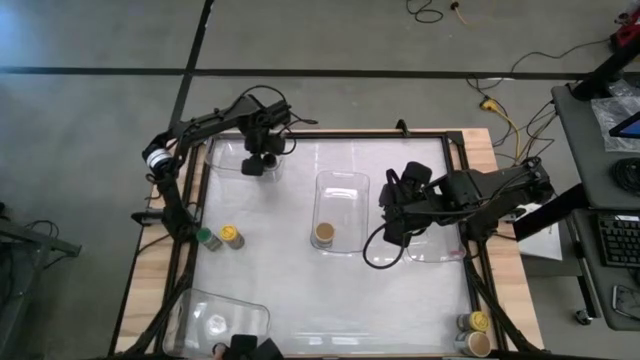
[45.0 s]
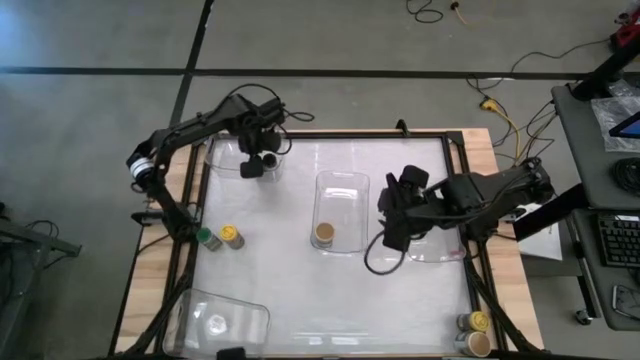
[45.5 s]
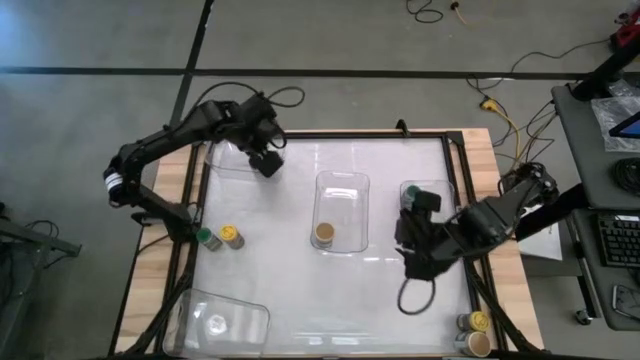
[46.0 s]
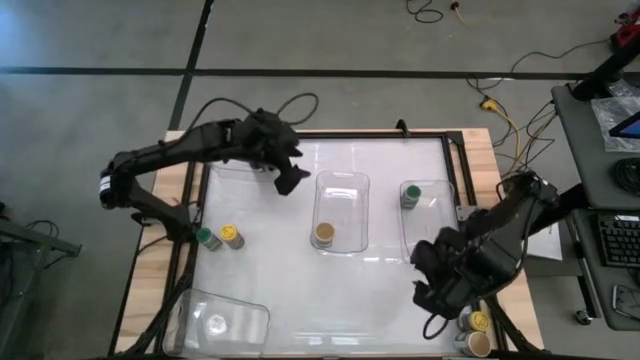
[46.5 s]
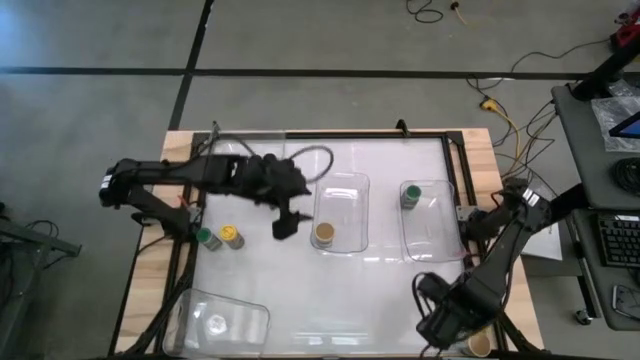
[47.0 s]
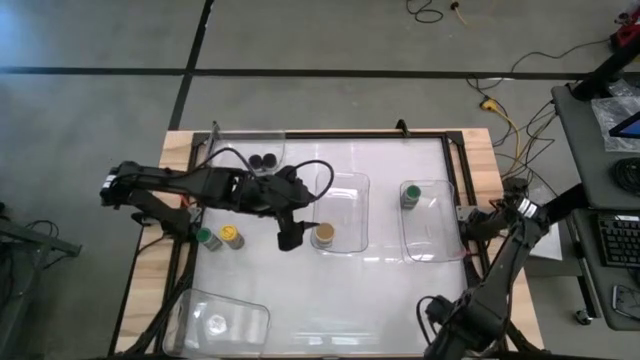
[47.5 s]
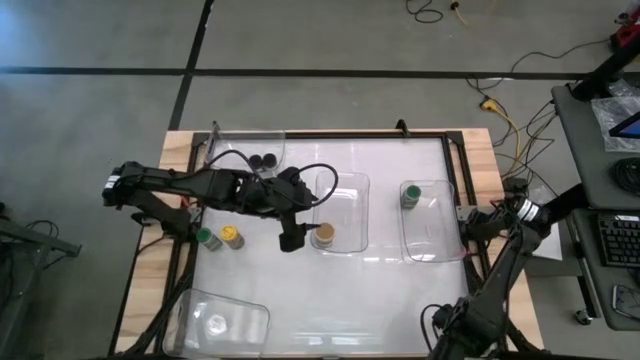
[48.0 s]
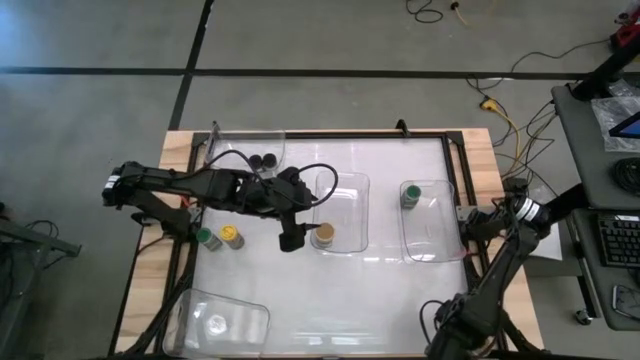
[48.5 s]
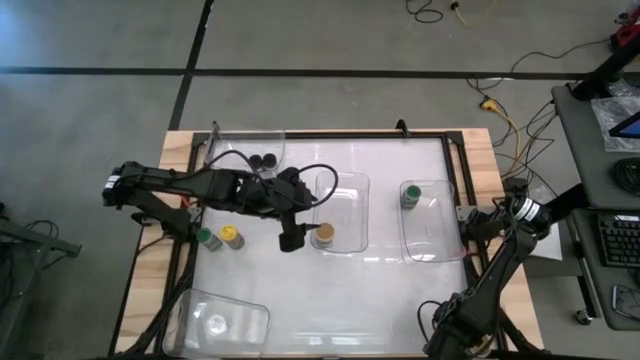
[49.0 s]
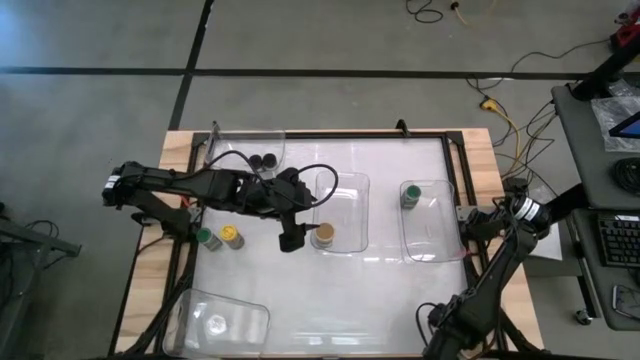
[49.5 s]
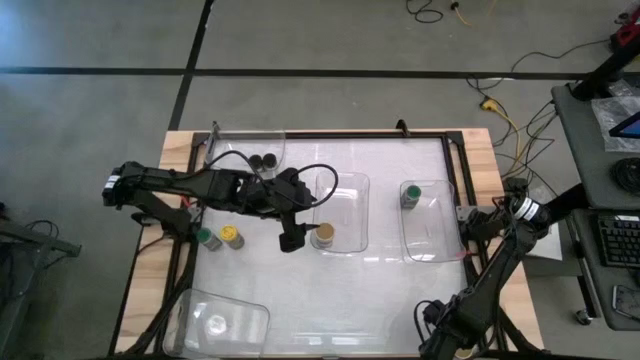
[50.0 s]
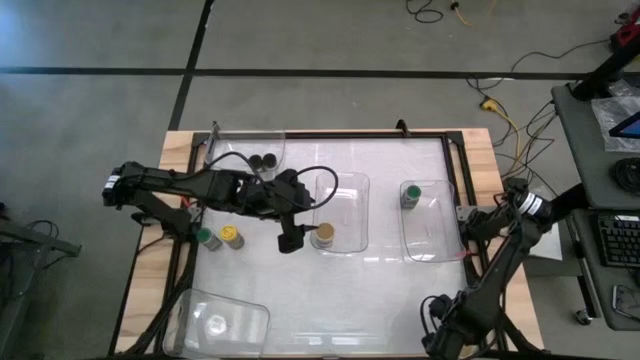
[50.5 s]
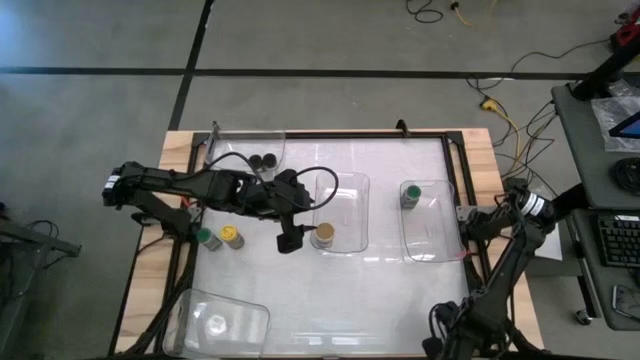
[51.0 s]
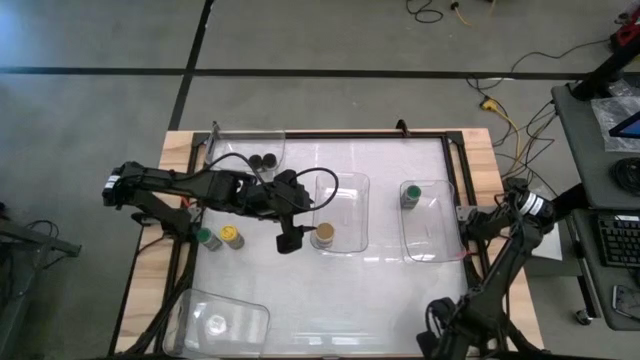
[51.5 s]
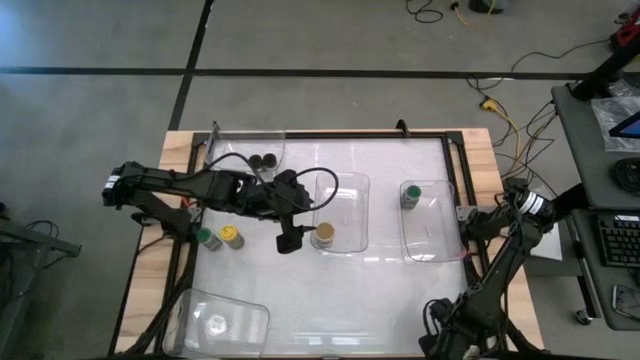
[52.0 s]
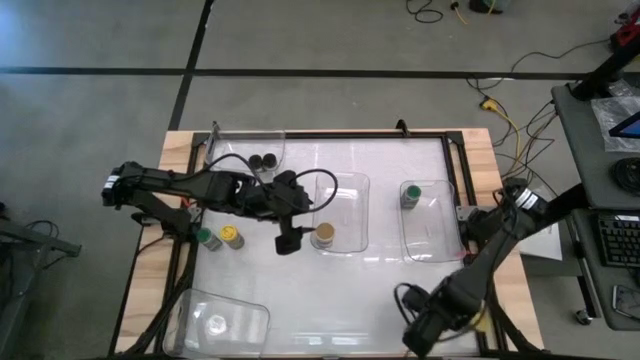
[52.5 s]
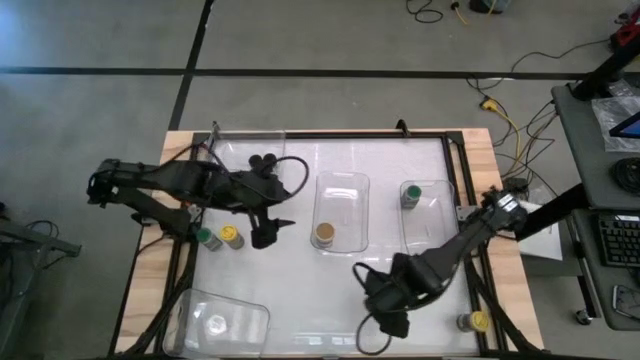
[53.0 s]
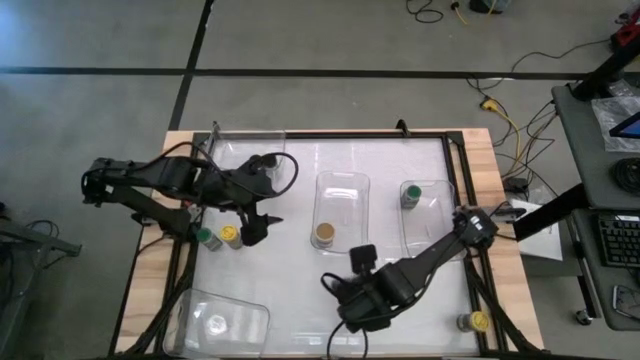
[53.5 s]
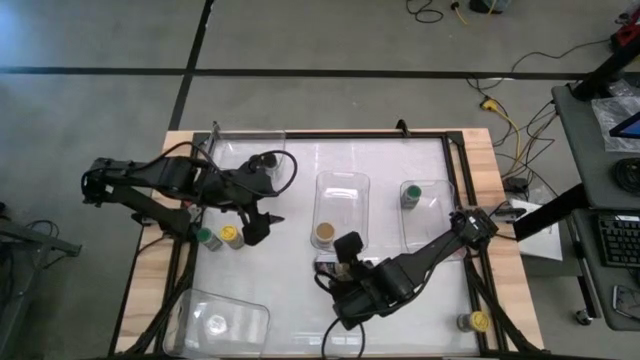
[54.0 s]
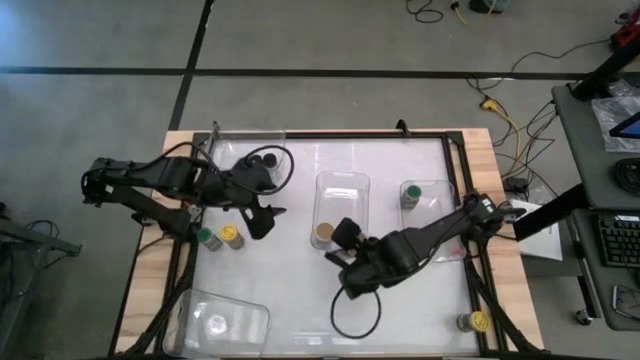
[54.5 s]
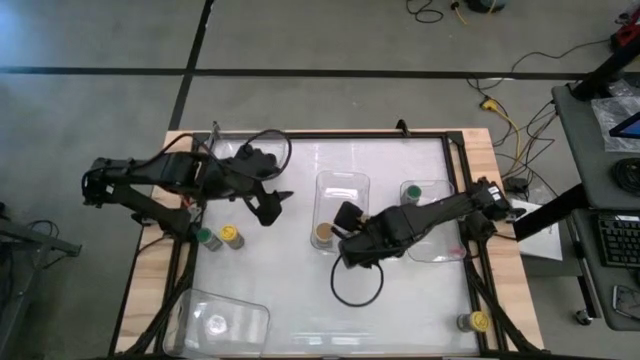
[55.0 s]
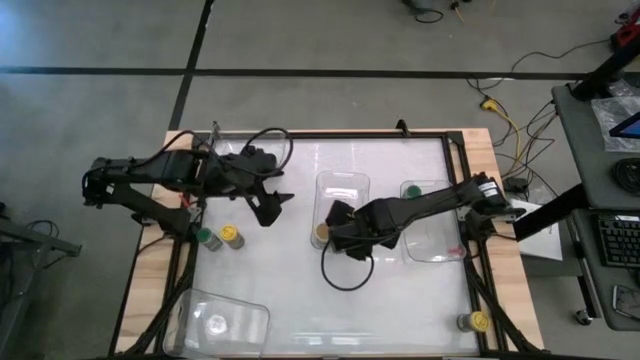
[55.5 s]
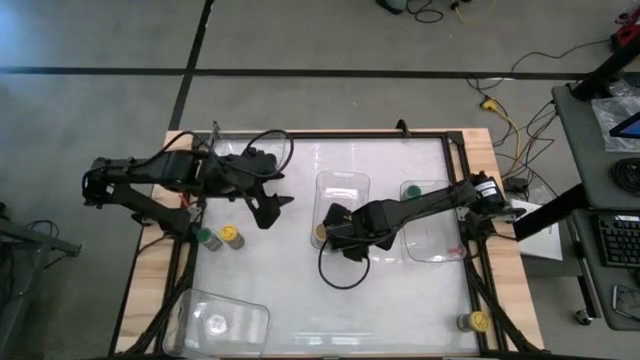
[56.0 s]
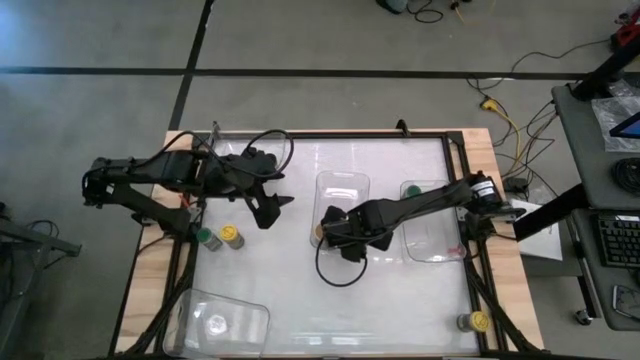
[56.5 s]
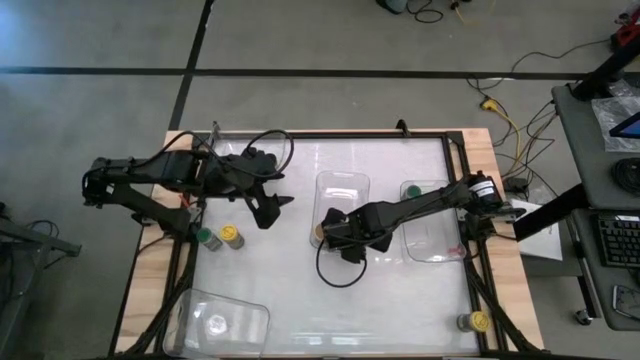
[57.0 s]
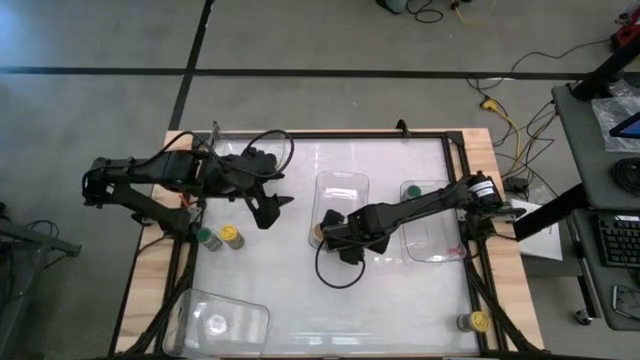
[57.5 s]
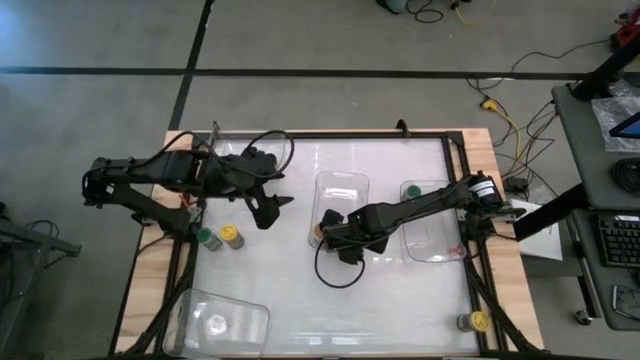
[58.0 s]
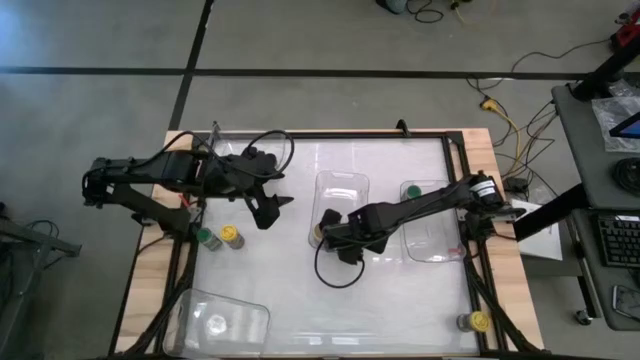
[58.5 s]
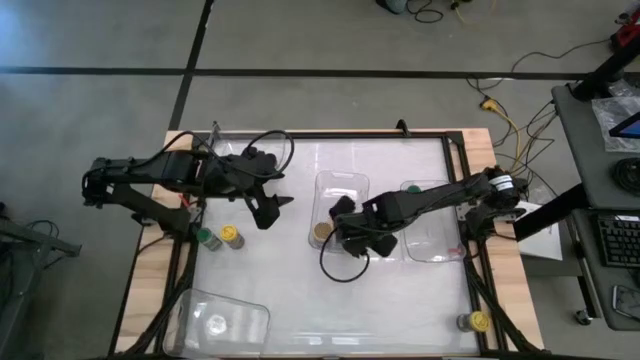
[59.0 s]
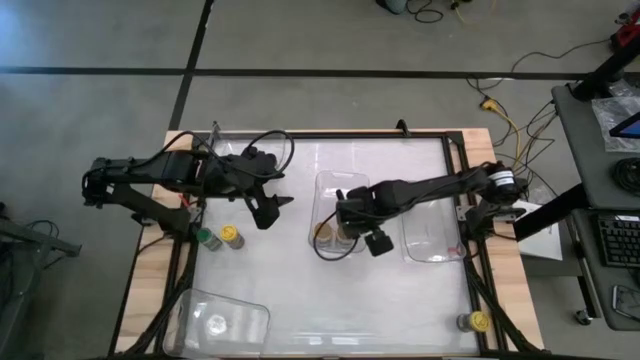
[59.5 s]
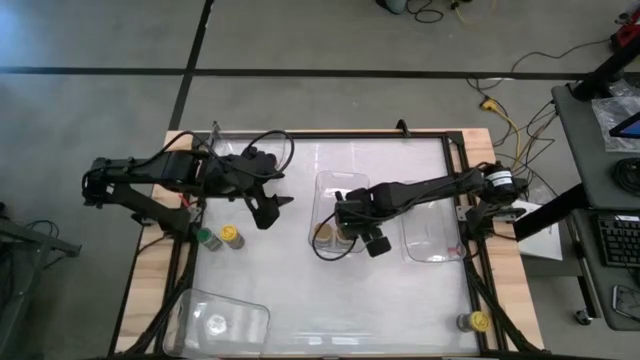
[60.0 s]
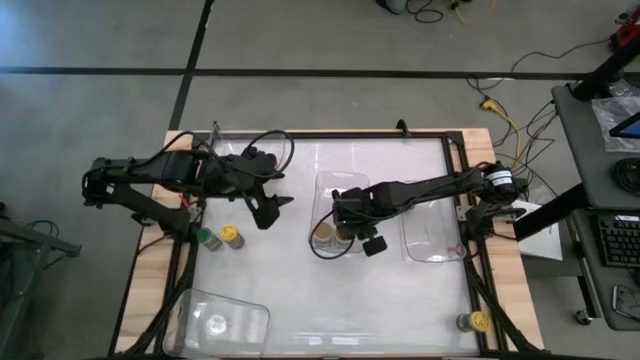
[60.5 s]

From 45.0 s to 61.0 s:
Task: Sort spices by type
Put the gold seasoning bottle into the center transparent bin

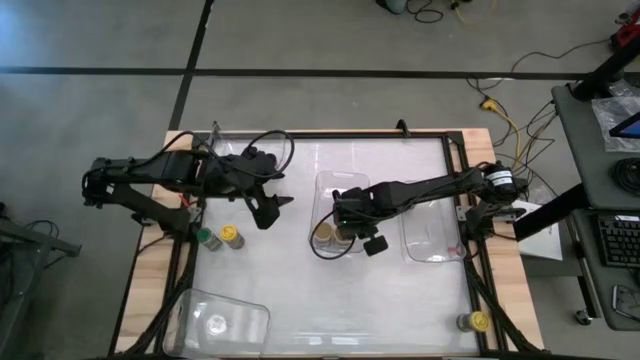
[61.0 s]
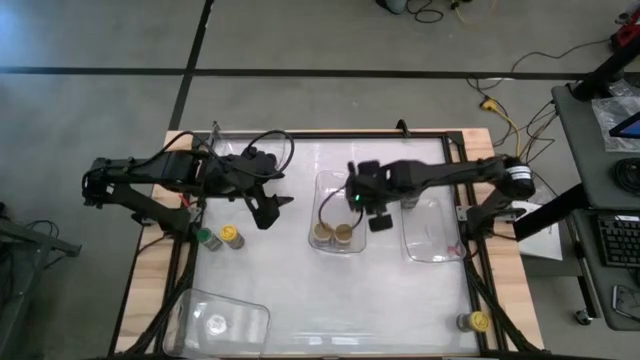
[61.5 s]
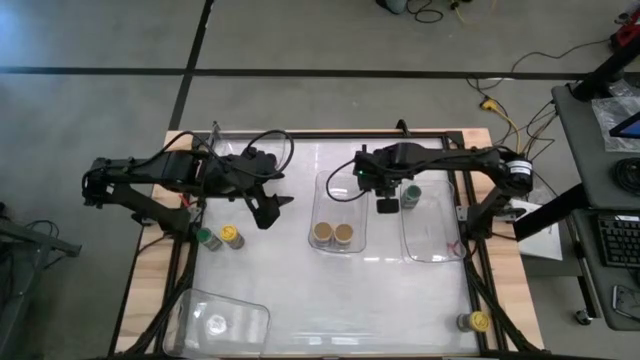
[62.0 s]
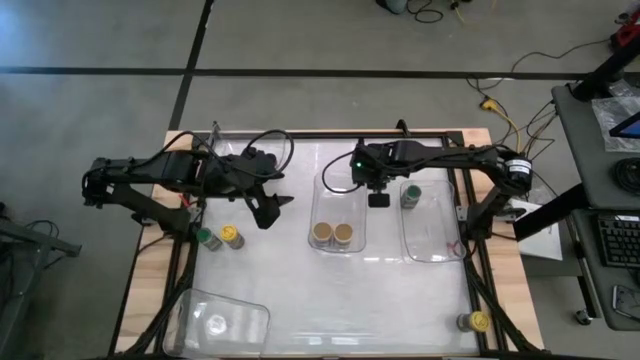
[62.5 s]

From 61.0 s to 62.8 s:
Adjust the center transparent bin

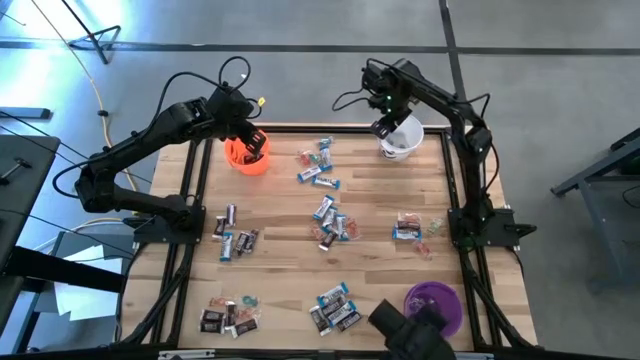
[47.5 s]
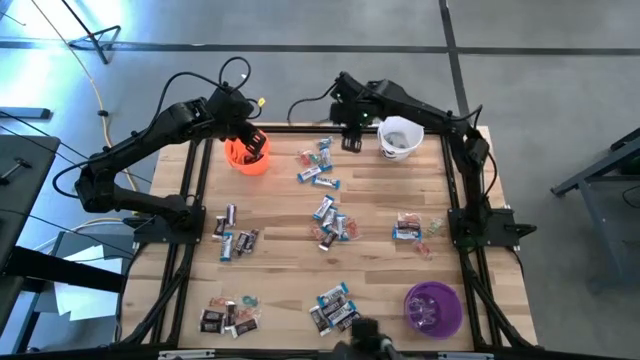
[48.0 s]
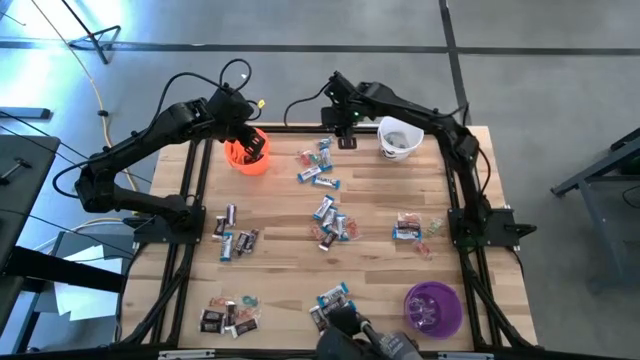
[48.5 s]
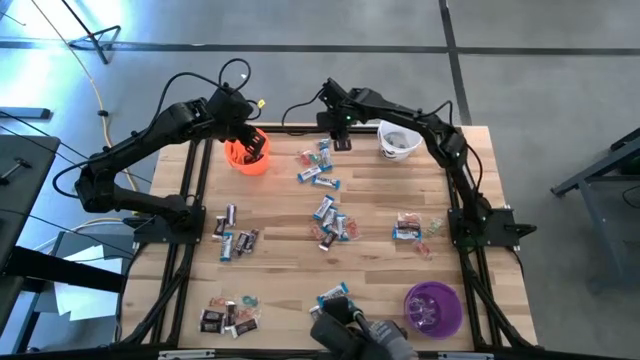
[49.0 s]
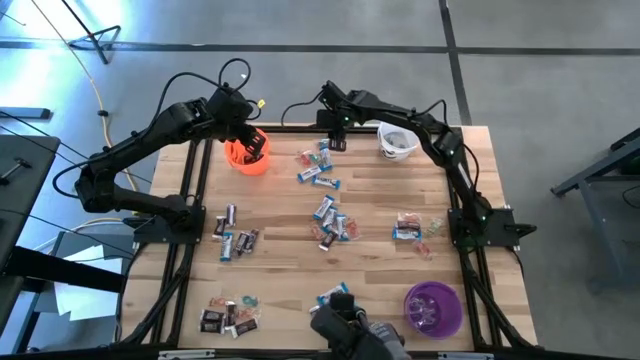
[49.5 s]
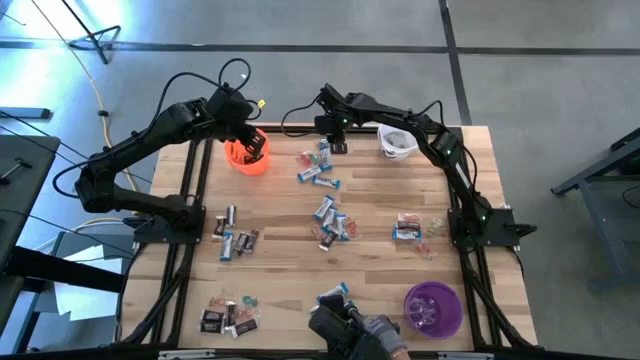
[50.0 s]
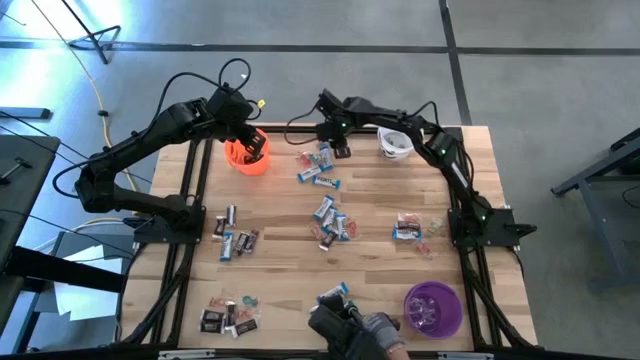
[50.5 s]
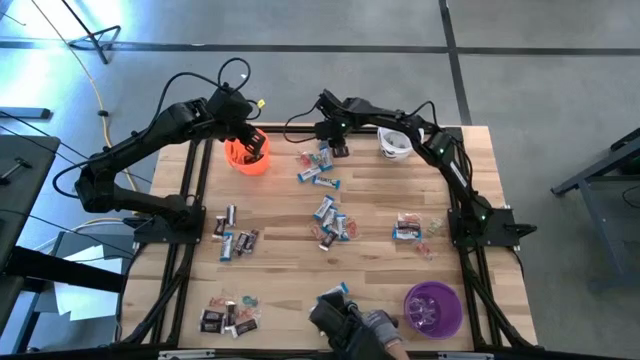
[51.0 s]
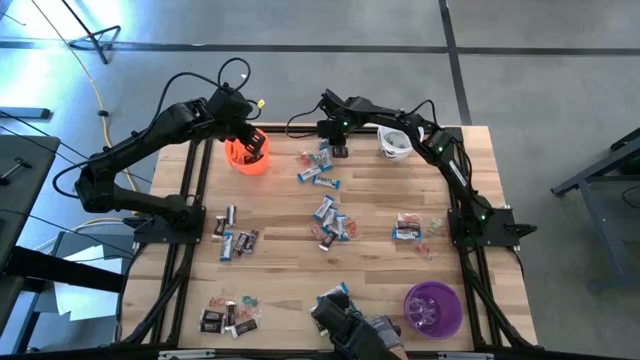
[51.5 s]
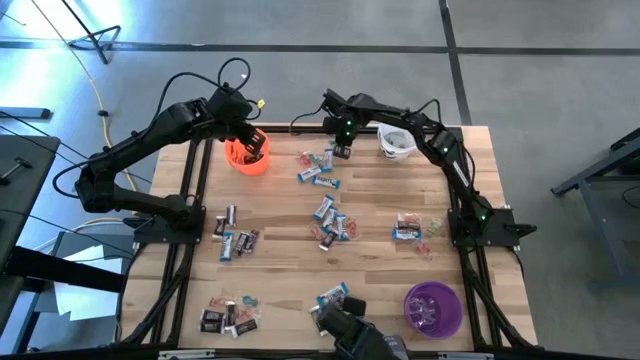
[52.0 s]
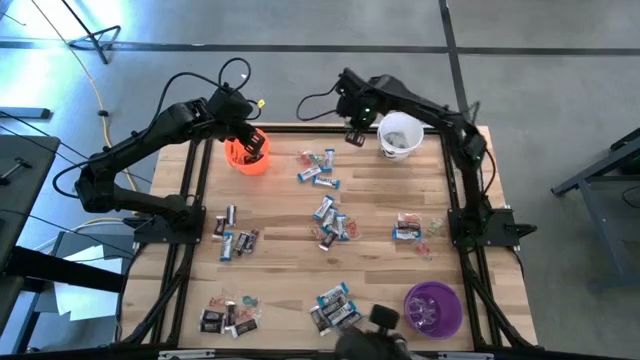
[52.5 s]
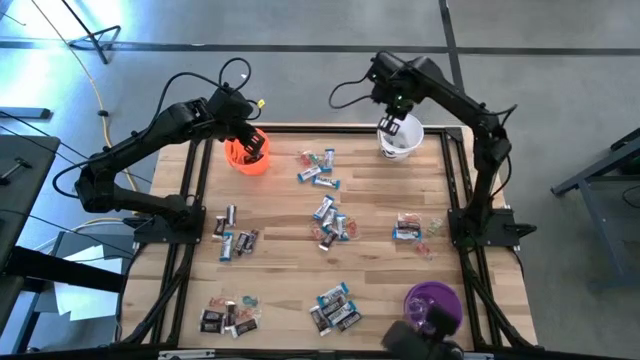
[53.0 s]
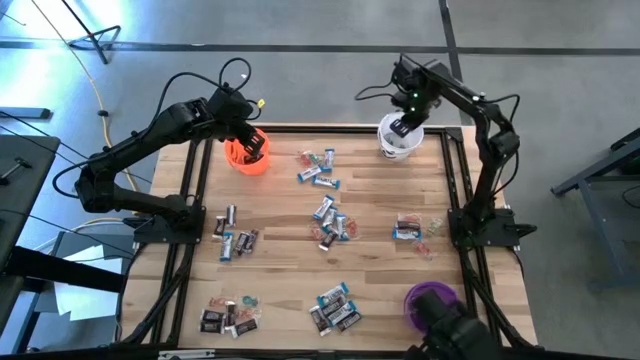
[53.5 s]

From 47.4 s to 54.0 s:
Task: Sort candy
Put the blue gummy into the white bucket
